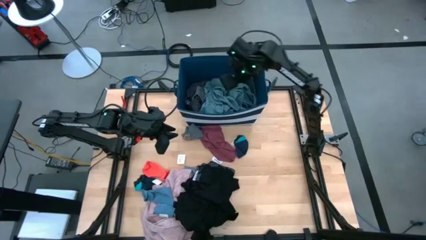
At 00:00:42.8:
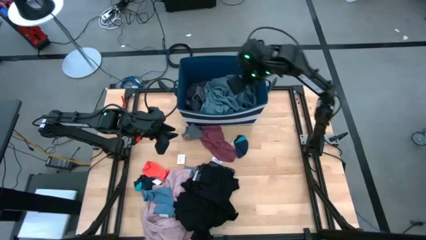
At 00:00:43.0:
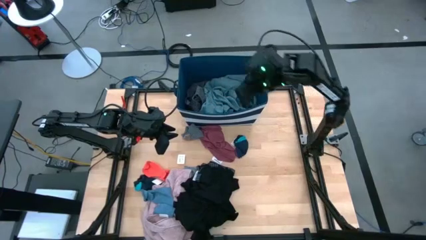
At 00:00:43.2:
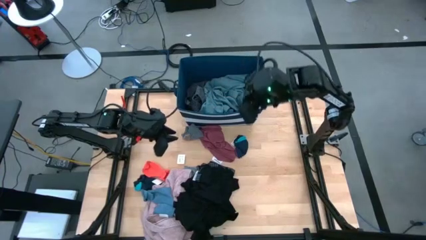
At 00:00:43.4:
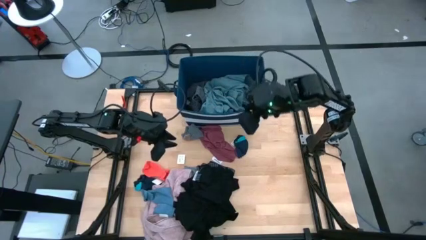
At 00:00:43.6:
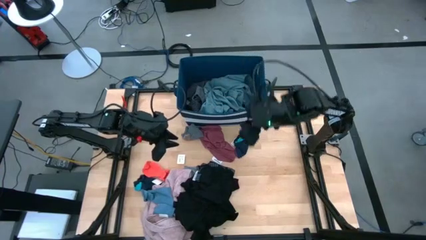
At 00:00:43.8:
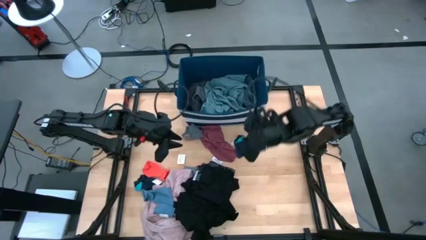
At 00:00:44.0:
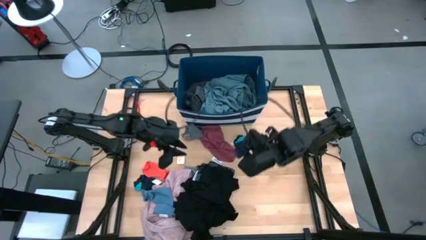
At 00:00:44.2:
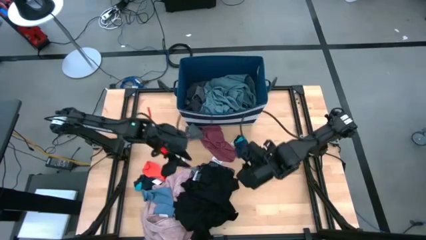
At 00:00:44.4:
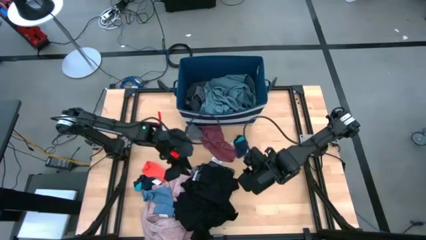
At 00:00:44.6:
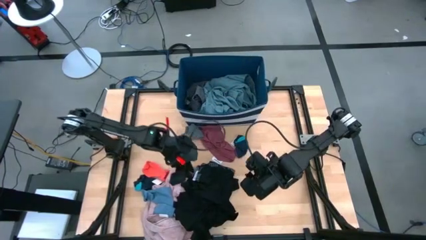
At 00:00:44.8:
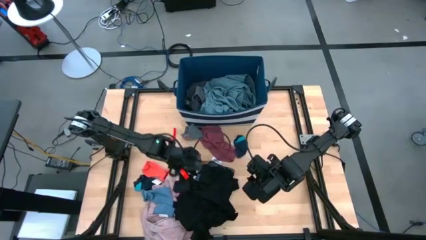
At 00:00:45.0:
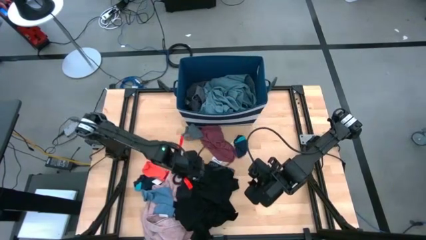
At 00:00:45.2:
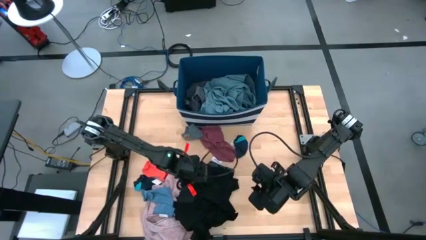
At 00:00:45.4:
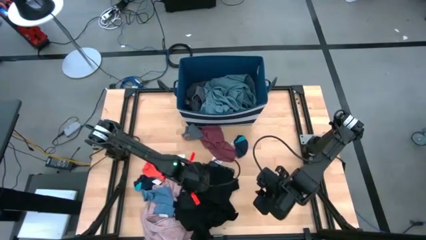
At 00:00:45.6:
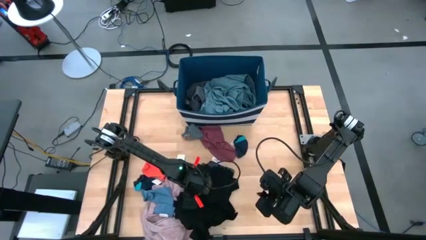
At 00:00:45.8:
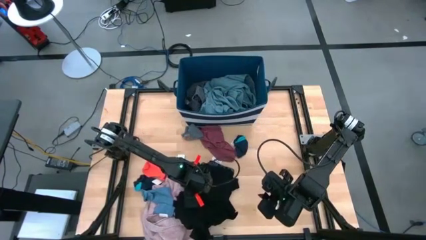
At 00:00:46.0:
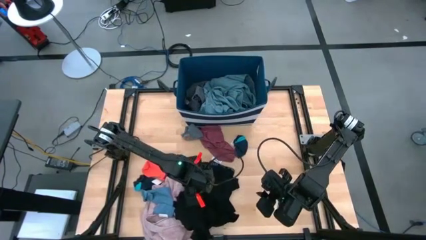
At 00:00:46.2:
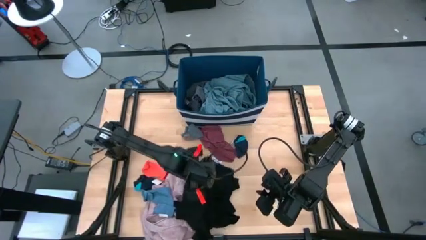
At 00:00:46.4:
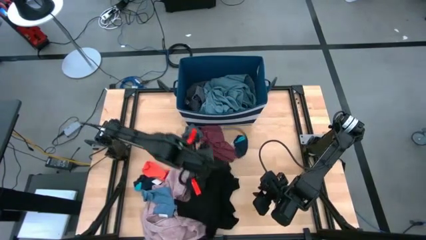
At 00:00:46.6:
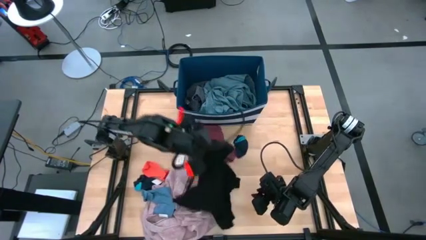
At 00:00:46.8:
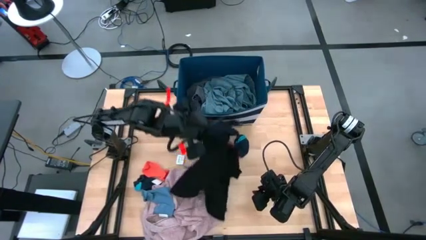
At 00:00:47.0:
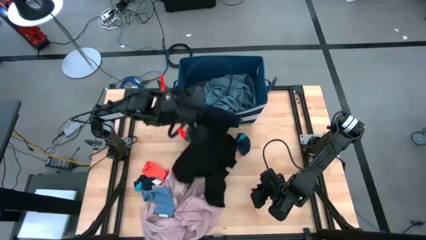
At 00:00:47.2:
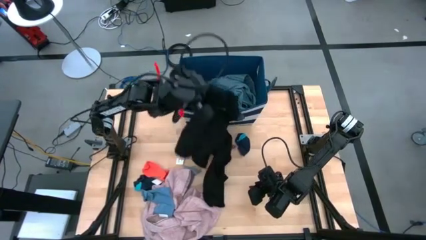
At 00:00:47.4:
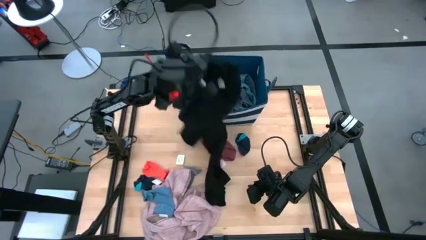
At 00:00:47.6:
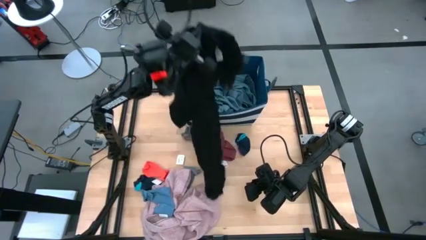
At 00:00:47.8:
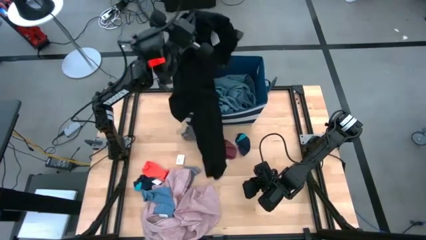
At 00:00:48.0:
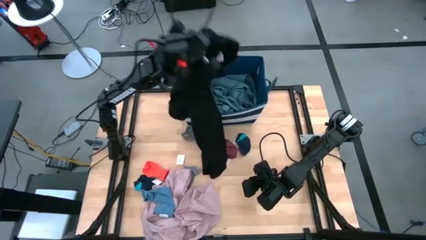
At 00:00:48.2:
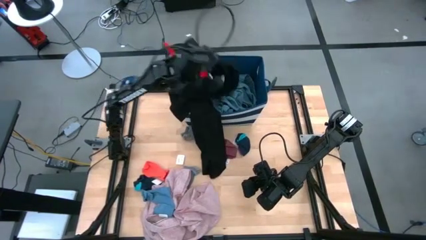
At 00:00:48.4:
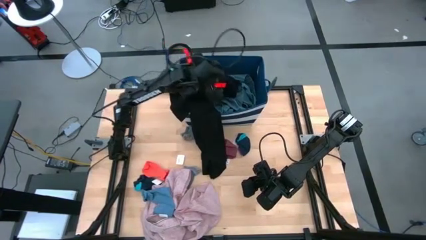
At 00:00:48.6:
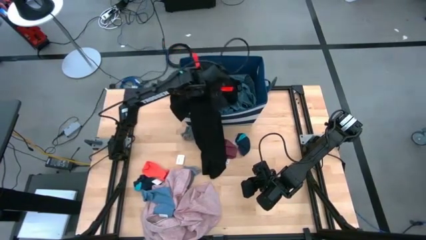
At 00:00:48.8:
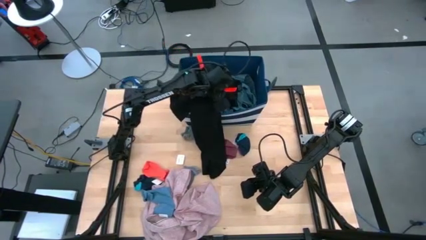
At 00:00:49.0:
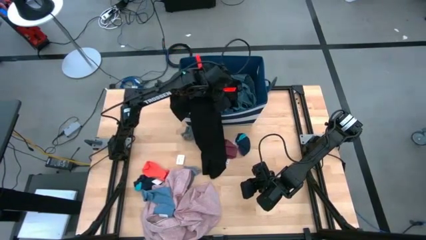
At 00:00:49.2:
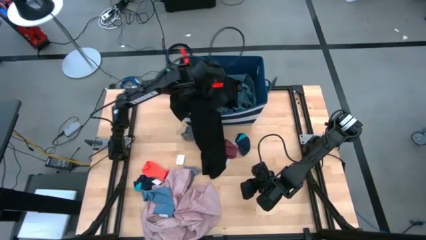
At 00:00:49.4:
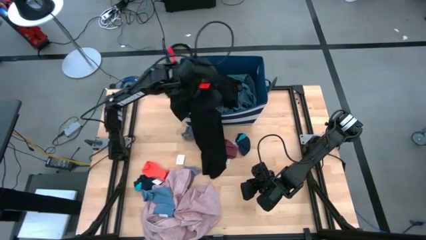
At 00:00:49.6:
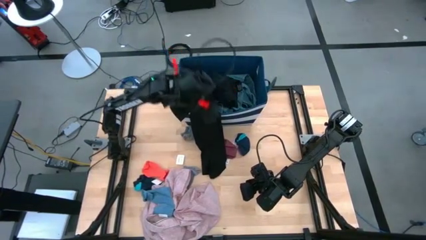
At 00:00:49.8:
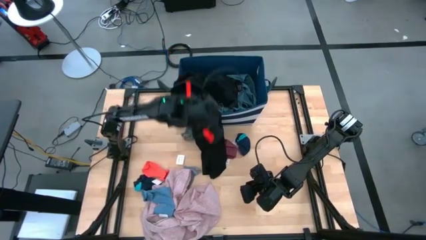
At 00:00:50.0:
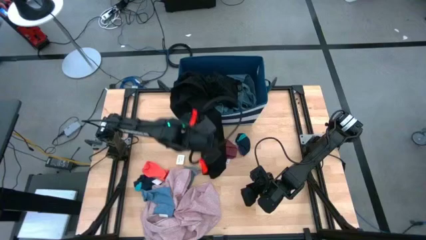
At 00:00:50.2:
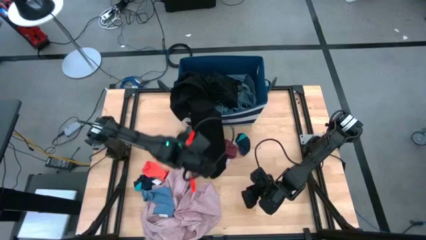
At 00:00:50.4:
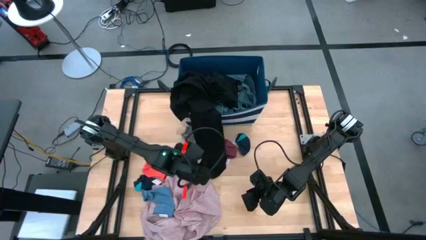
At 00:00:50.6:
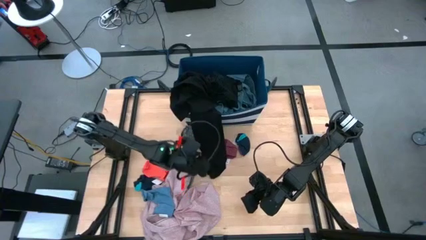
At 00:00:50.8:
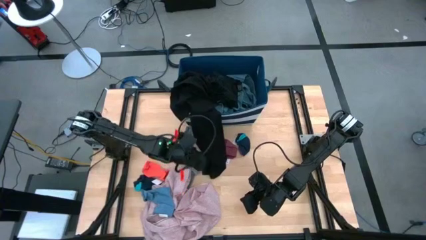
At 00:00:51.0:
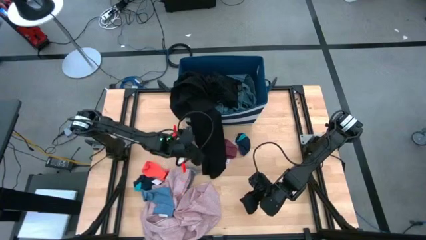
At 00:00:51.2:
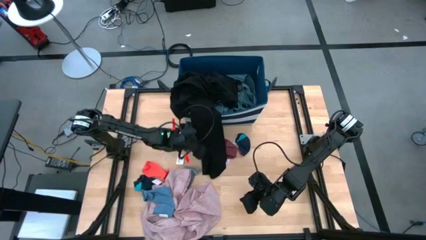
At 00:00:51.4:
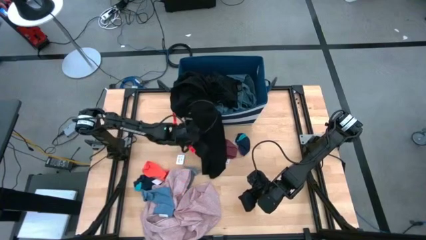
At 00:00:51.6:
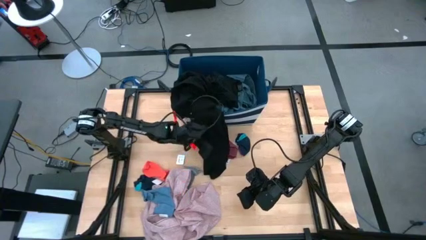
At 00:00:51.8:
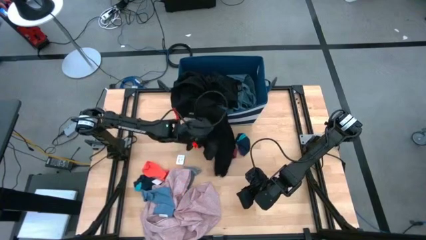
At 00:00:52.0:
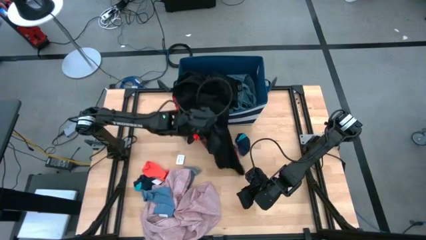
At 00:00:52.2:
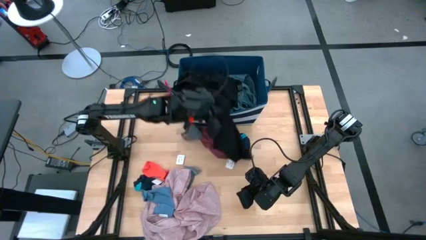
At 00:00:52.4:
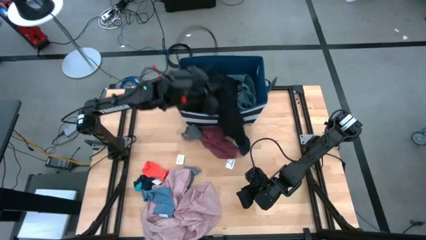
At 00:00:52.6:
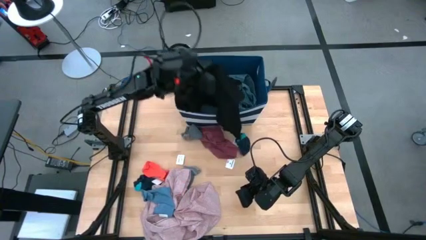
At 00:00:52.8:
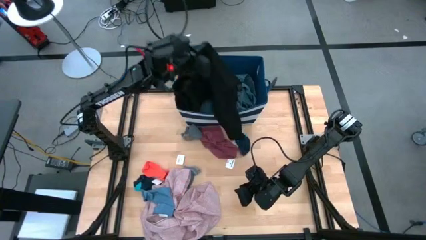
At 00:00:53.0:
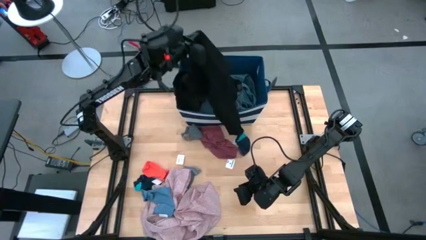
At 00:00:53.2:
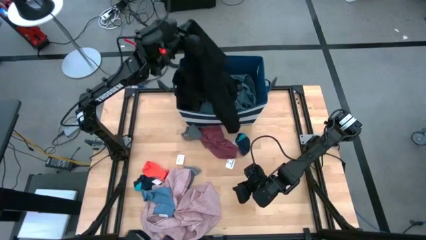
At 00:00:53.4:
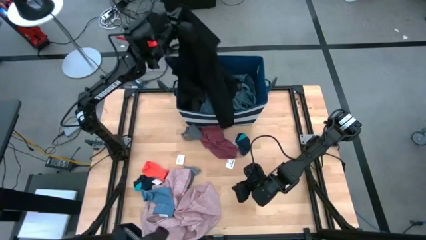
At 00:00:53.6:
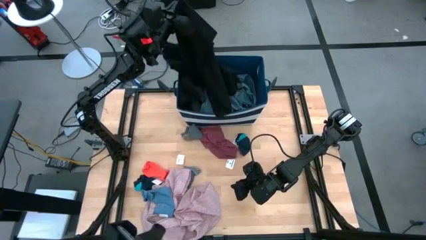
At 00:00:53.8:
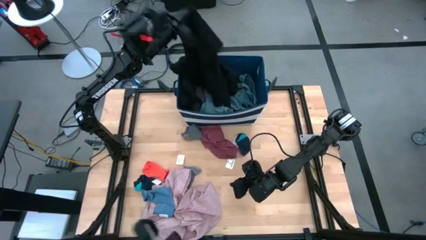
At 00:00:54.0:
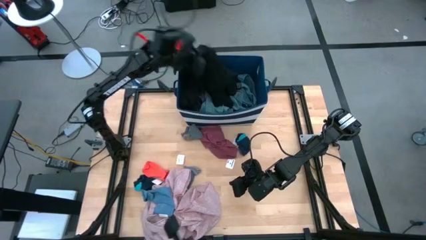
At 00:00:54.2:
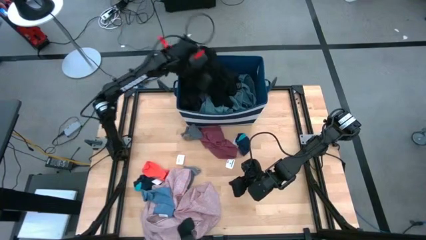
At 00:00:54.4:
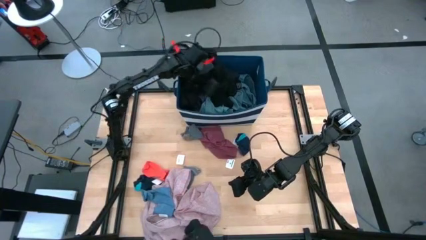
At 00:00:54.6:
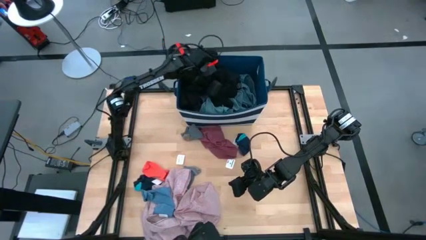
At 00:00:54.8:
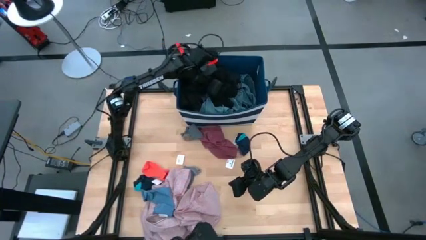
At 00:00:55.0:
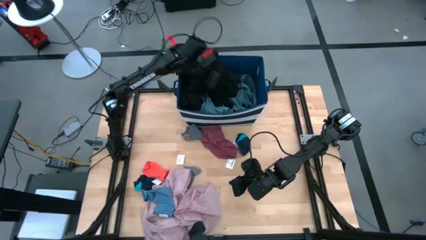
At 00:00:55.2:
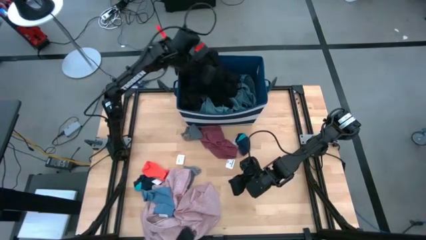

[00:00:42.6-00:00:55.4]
Task: Sort clothes
Put the black pants into the blue bin

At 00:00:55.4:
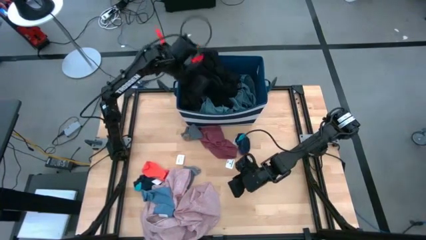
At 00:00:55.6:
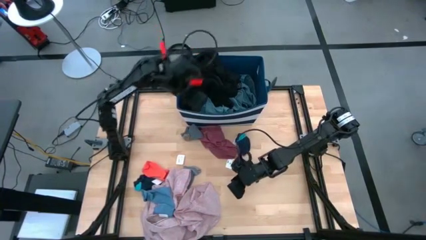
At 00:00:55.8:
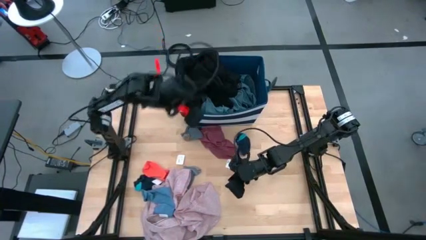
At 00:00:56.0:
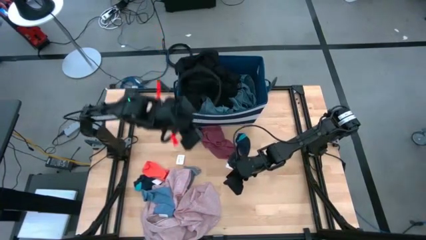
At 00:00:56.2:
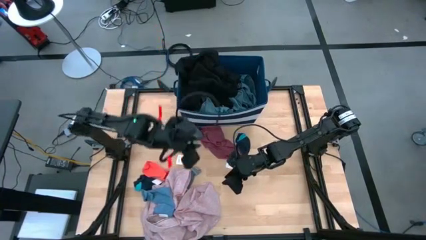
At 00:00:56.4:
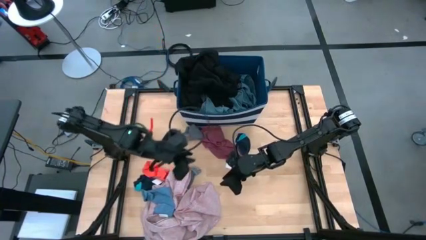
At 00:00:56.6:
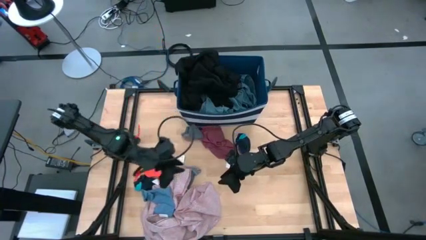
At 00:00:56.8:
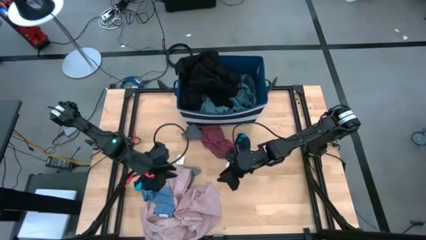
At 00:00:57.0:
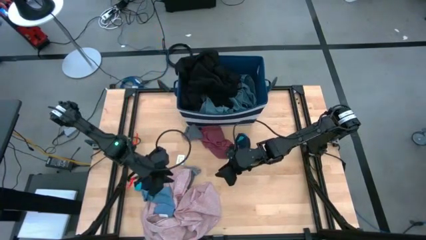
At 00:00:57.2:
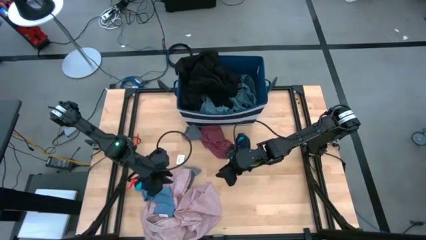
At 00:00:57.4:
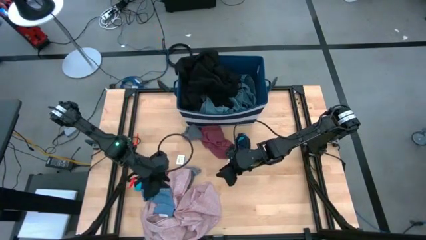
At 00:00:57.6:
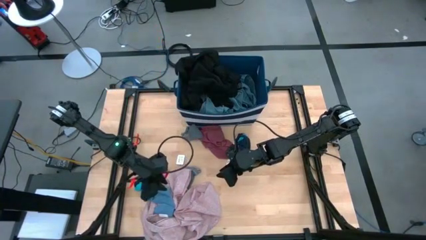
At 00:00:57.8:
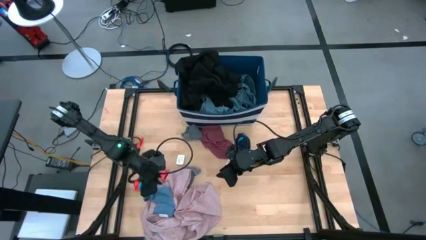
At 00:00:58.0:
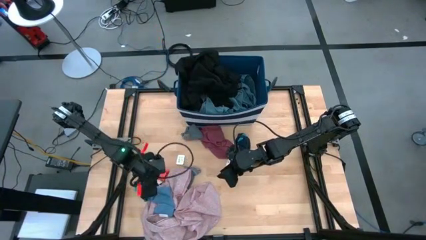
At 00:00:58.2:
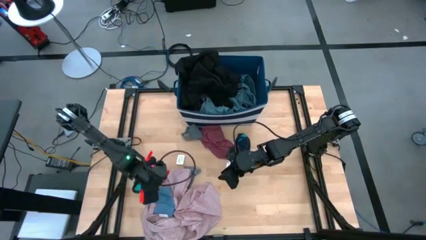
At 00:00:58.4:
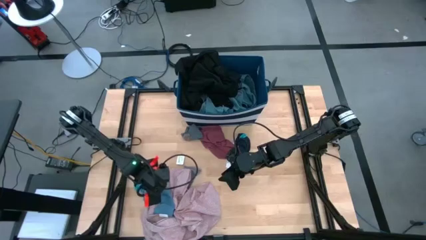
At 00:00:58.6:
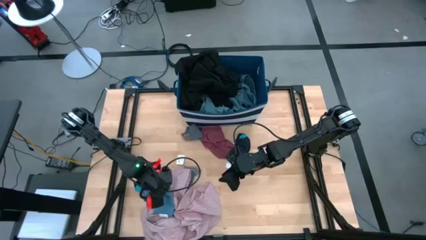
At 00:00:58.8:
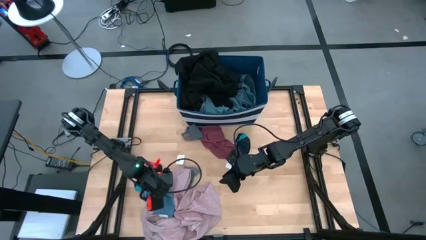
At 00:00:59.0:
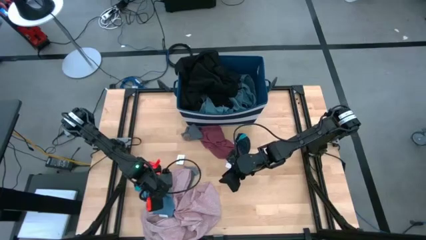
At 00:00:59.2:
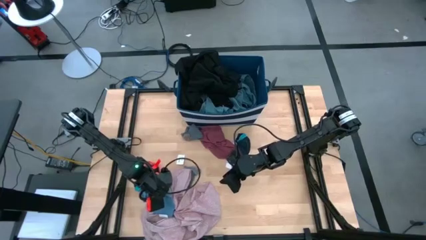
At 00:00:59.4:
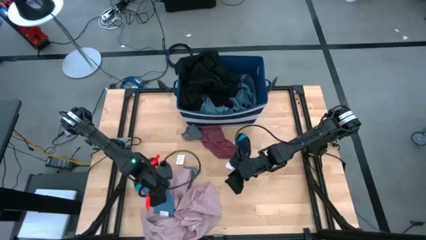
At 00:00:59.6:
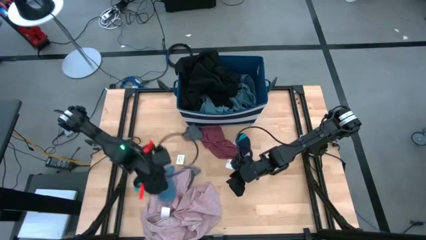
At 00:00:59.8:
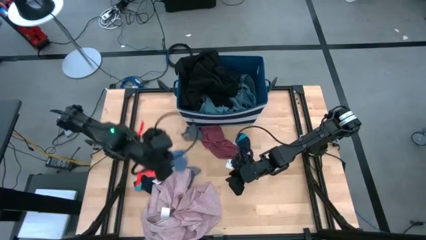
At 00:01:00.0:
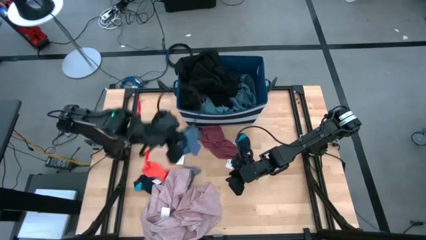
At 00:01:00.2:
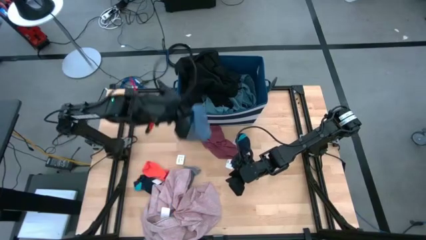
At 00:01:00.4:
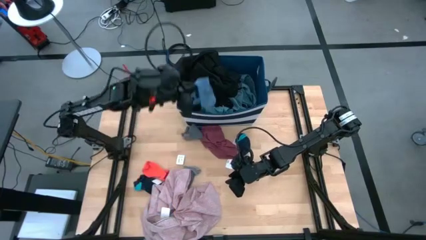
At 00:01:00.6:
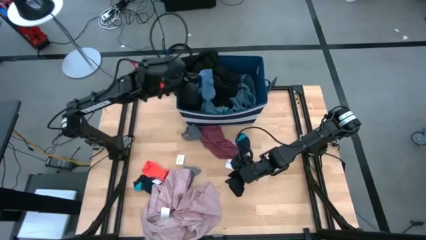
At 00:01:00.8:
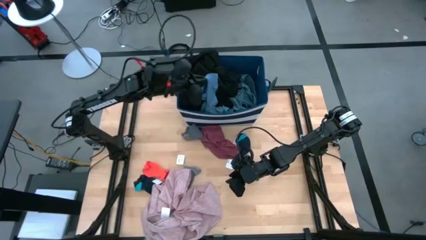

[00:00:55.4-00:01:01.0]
Put the blue sock into the blue bin
